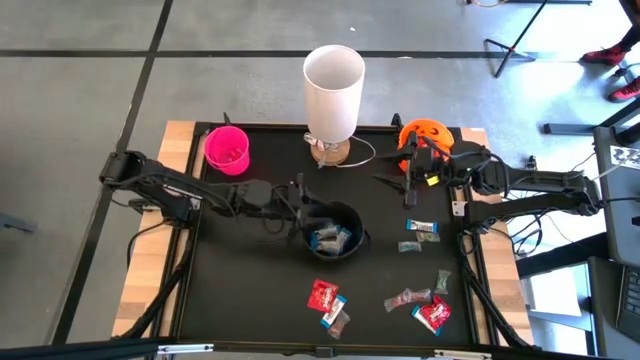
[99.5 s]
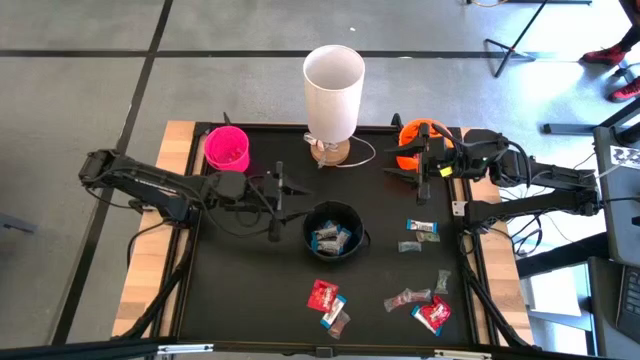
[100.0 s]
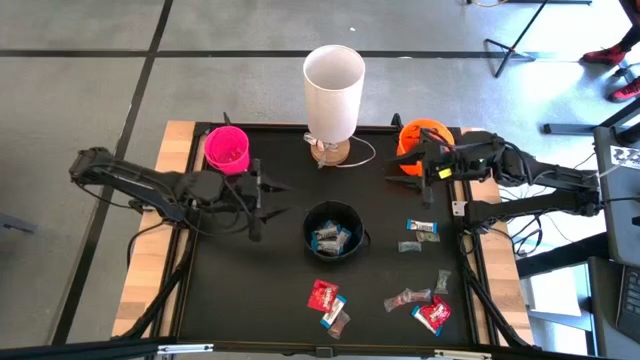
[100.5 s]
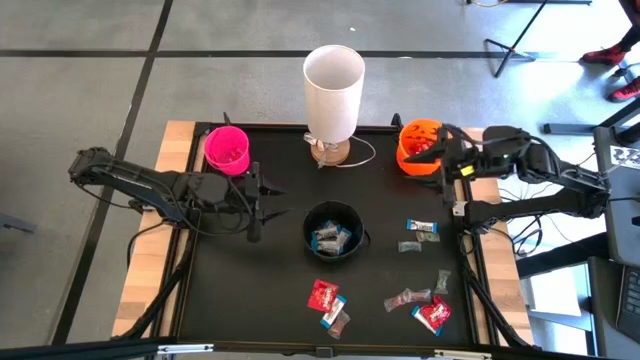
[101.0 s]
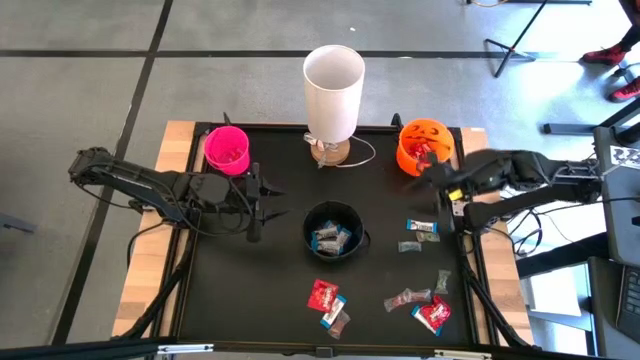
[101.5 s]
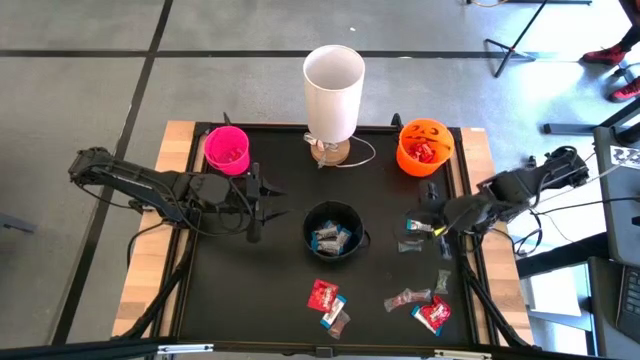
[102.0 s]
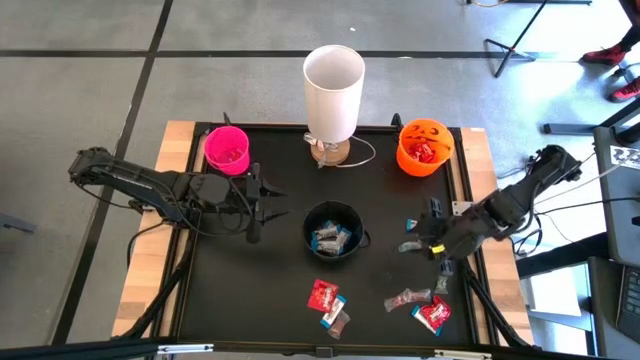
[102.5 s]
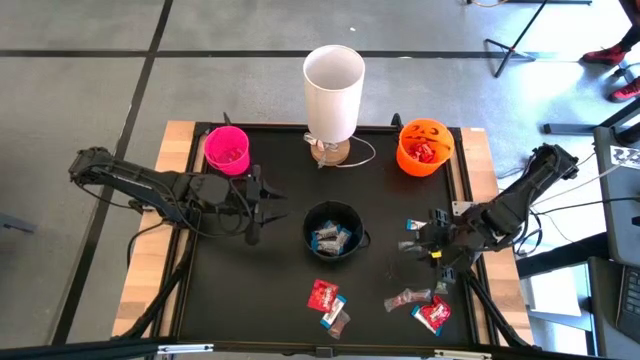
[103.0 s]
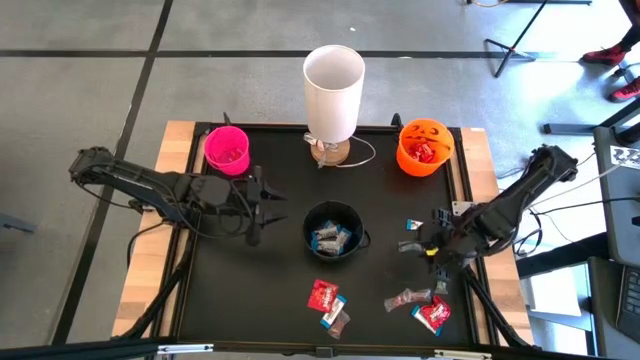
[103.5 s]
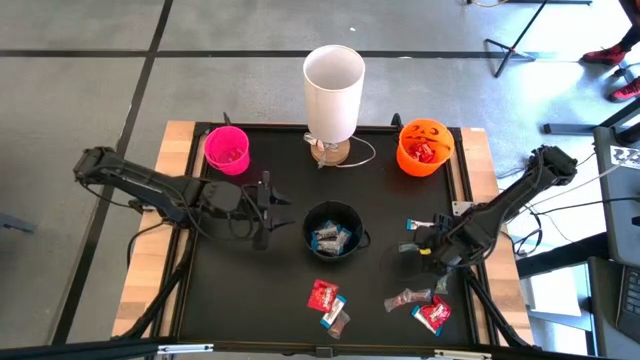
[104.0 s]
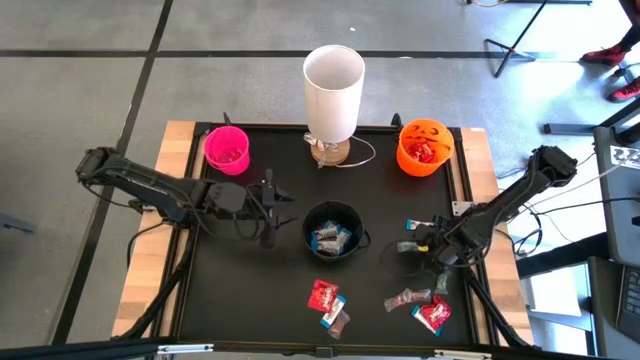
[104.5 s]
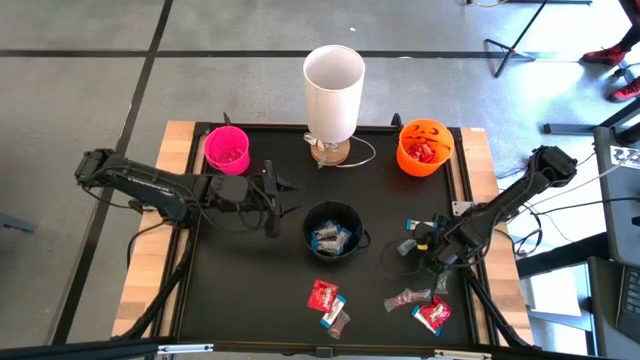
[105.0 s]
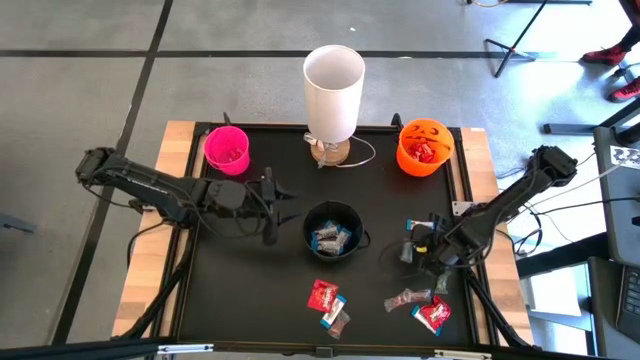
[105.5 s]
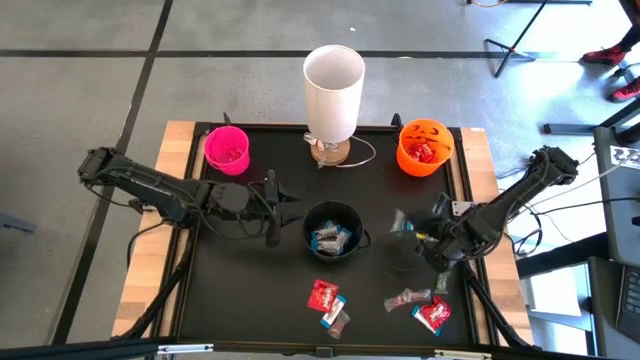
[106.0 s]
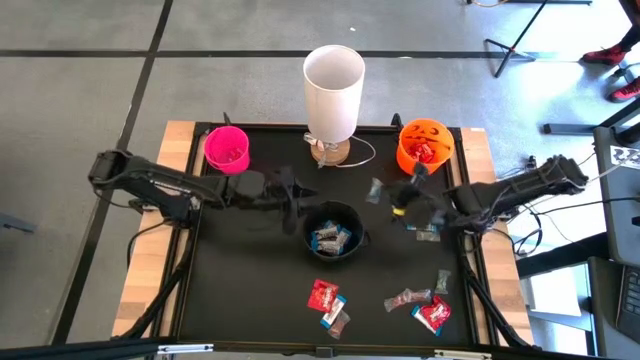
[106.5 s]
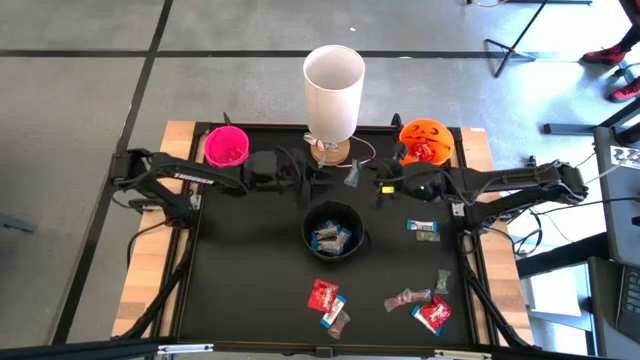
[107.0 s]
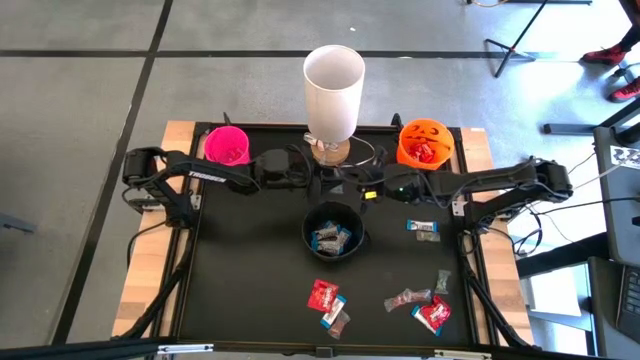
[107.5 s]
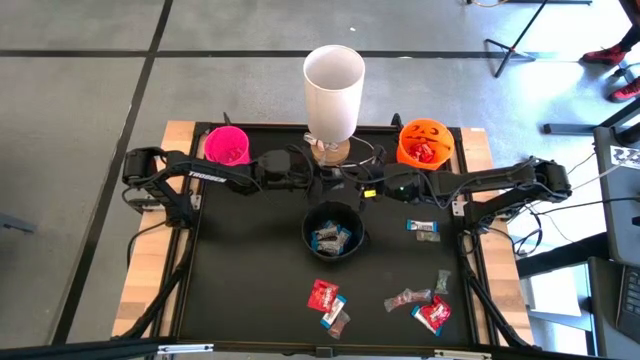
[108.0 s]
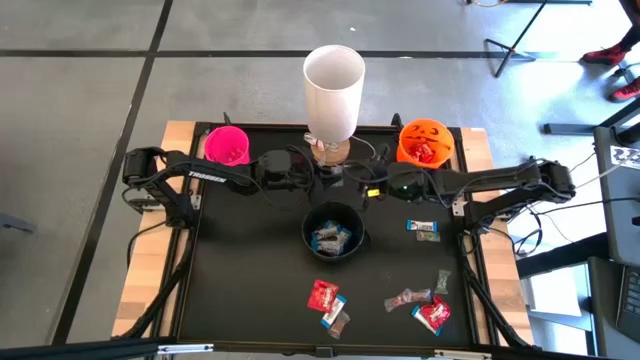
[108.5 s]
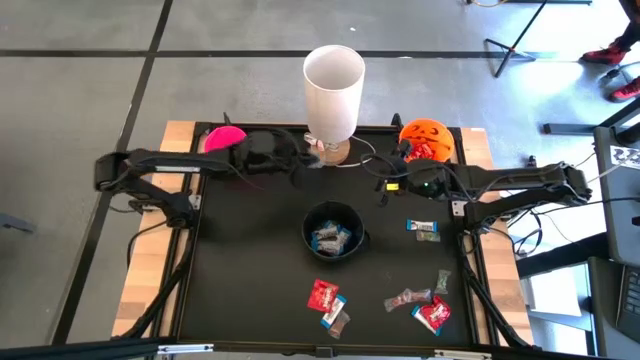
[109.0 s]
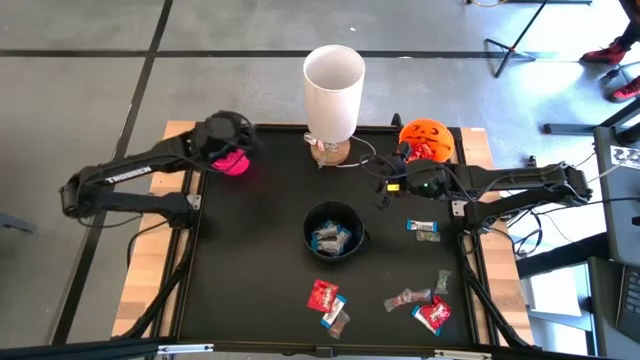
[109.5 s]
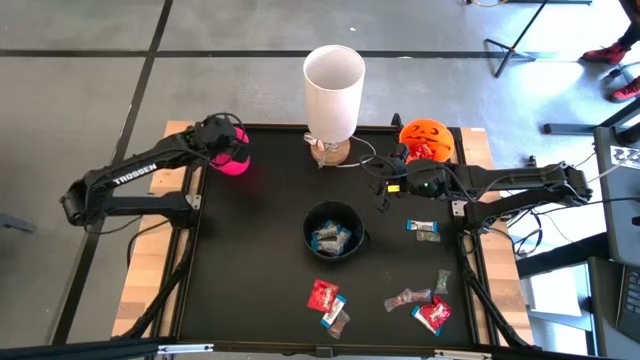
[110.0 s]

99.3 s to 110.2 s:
Task: Sort candy
Put the blue gummy into the pink bucket

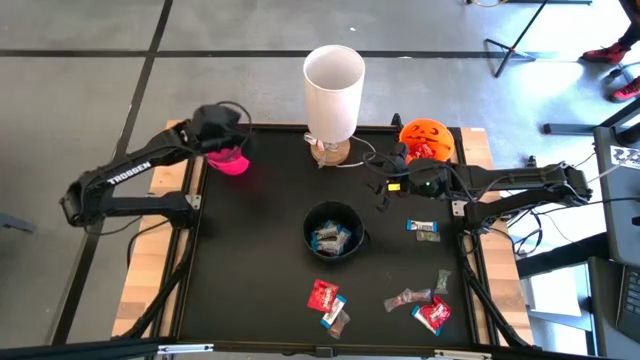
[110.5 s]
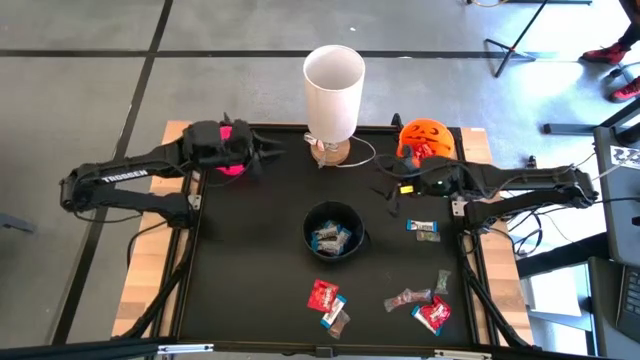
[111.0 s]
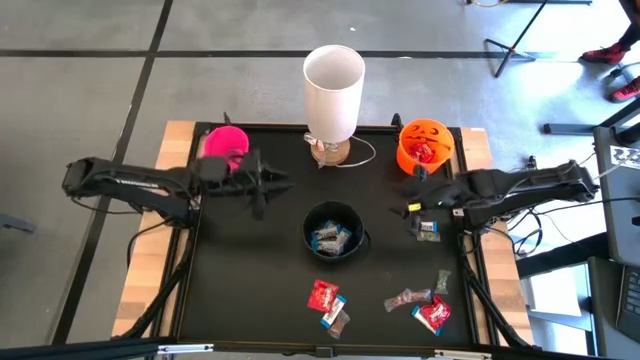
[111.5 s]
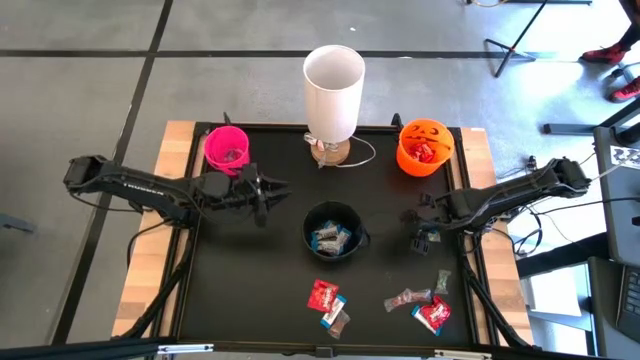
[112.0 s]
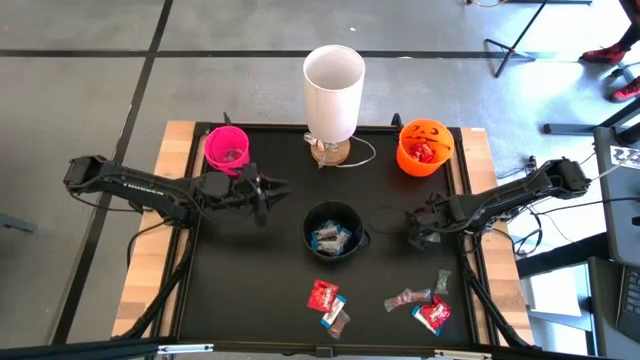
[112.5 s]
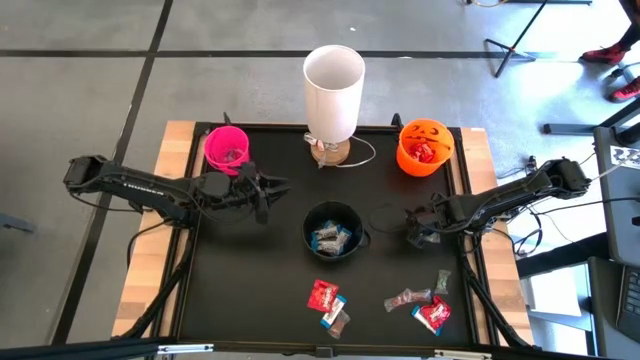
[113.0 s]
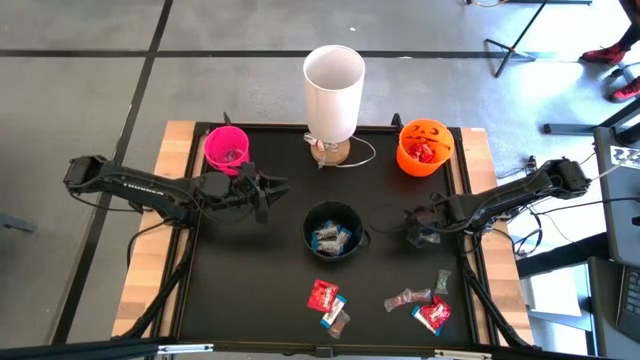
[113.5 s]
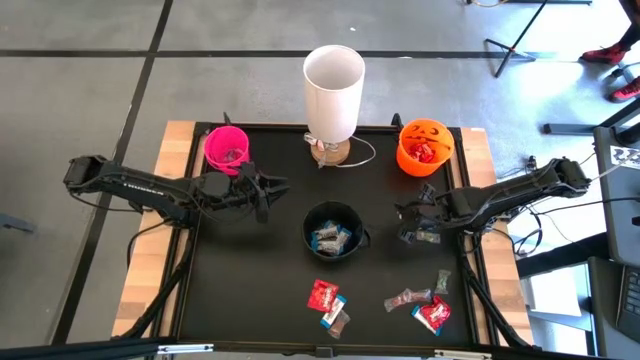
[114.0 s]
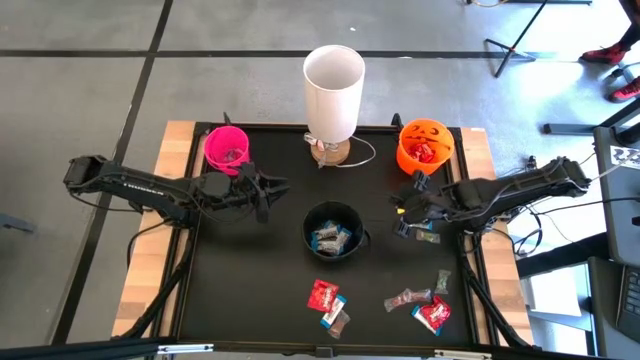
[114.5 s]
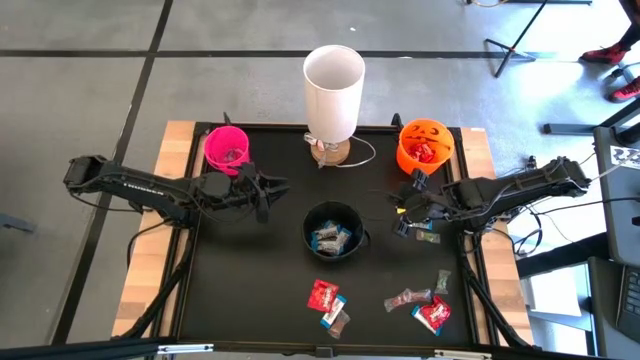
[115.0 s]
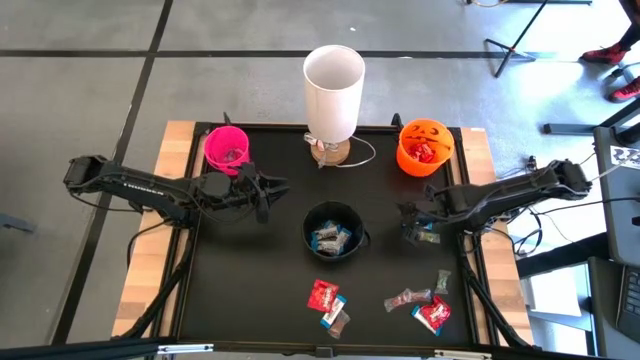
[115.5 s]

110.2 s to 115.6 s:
Put the white chocolate into the black bucket

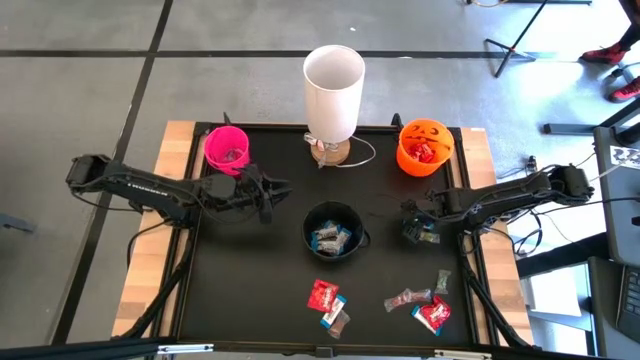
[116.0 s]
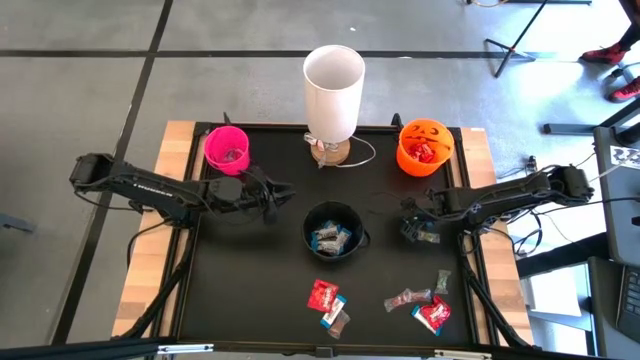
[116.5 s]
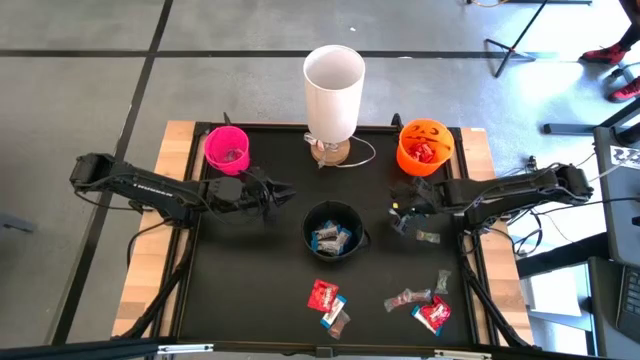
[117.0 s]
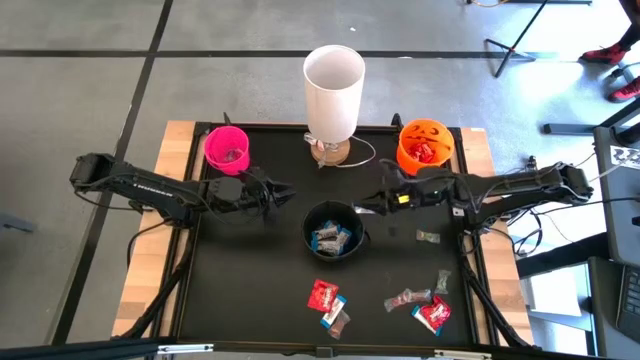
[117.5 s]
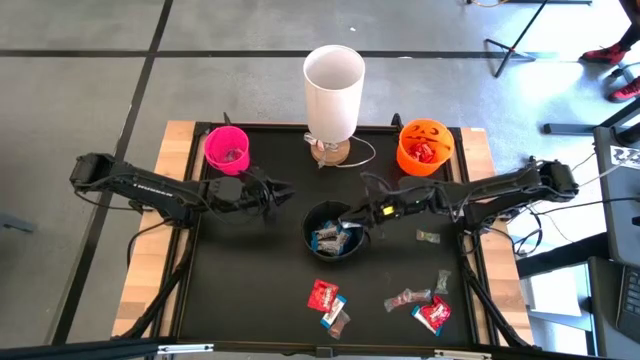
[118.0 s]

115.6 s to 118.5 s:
Put the white chocolate into the black bucket
